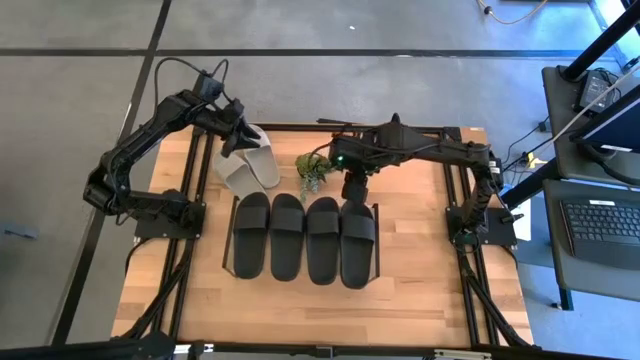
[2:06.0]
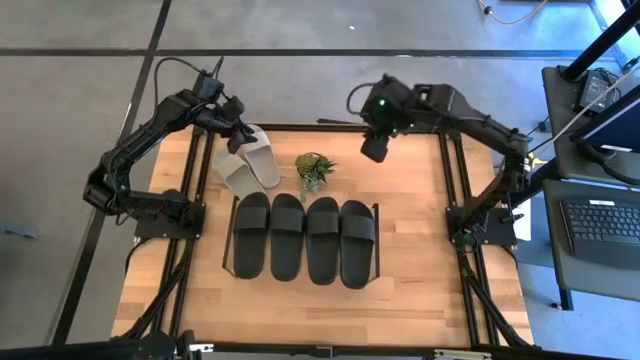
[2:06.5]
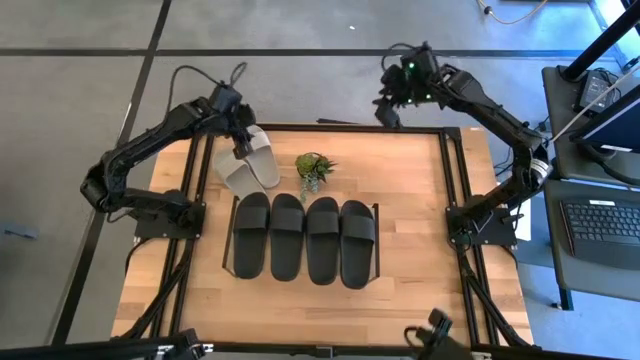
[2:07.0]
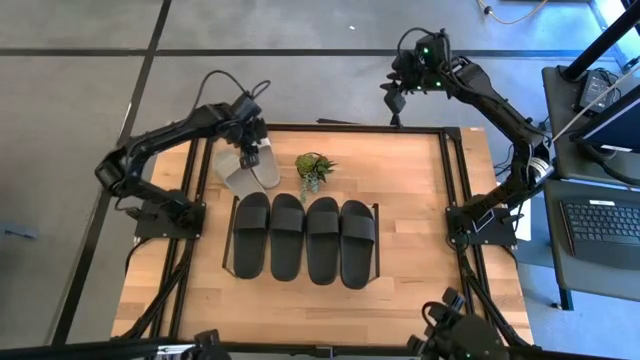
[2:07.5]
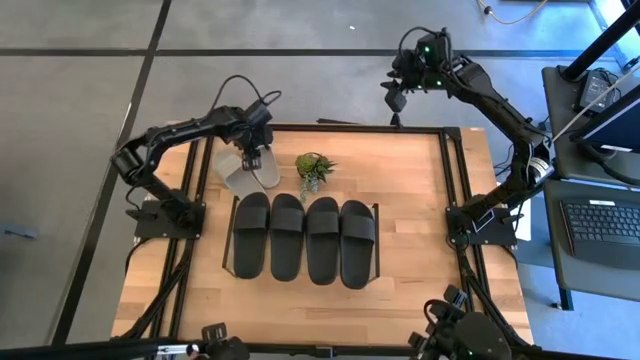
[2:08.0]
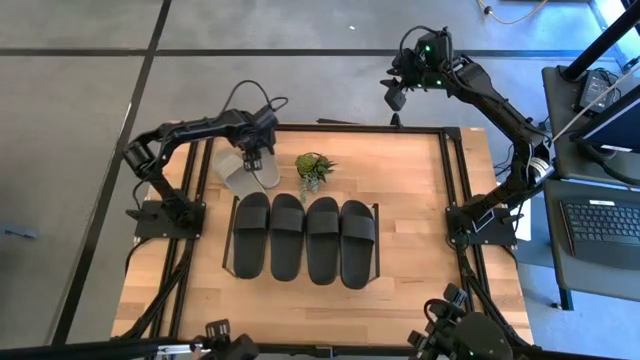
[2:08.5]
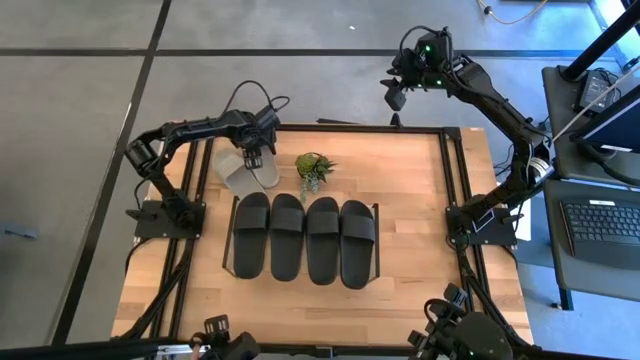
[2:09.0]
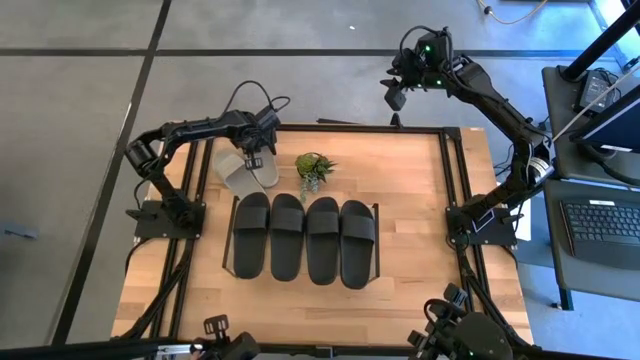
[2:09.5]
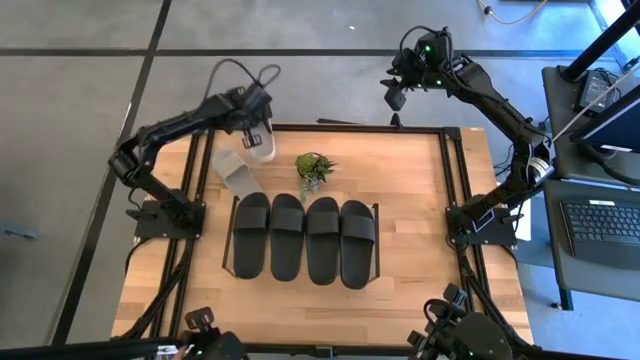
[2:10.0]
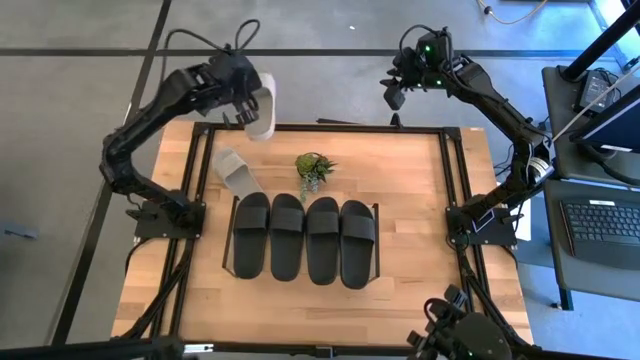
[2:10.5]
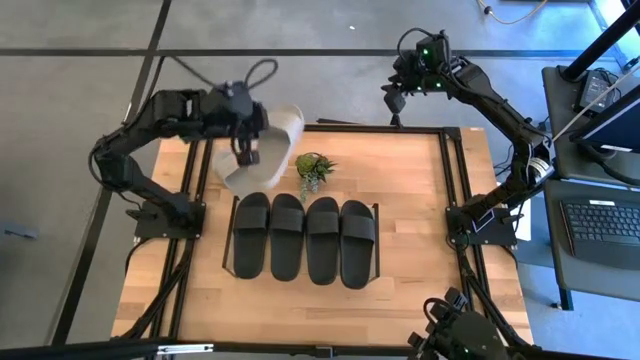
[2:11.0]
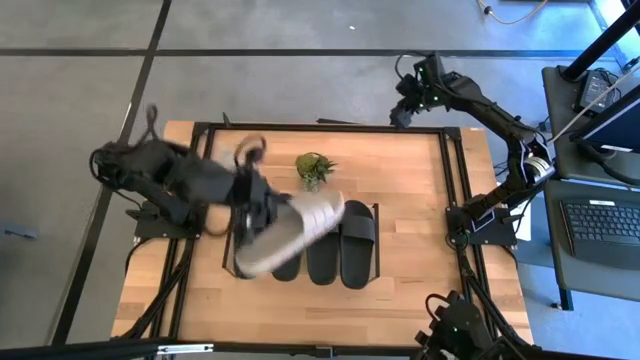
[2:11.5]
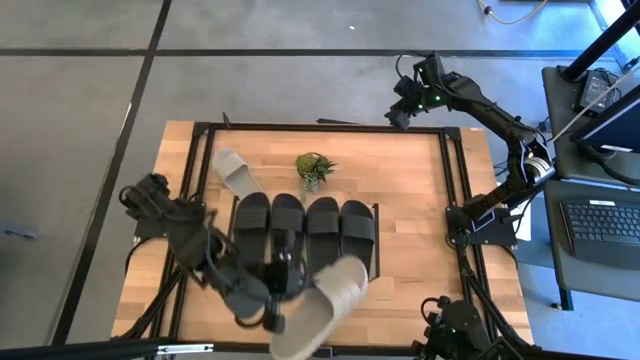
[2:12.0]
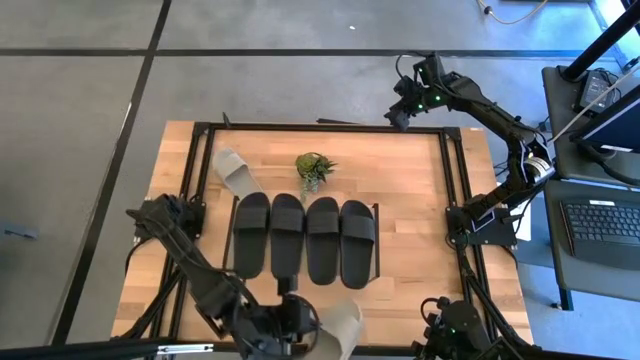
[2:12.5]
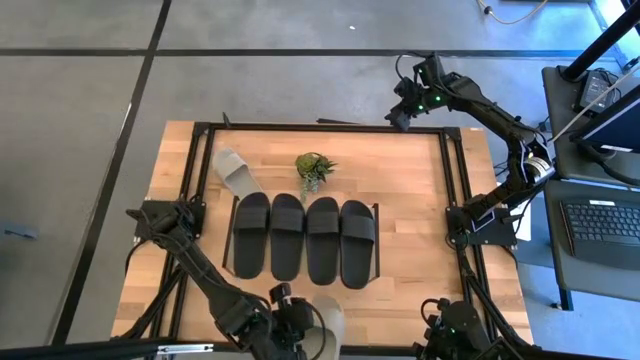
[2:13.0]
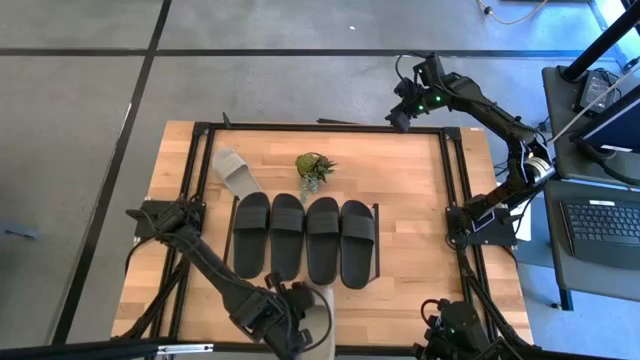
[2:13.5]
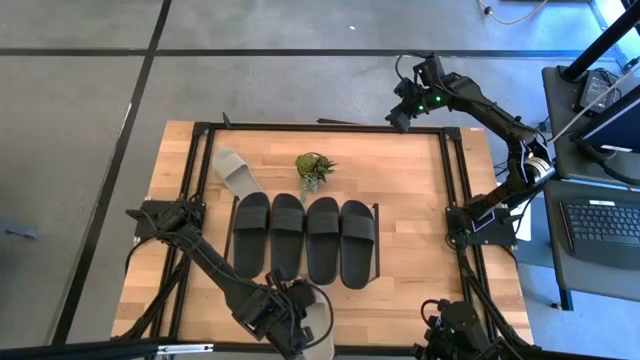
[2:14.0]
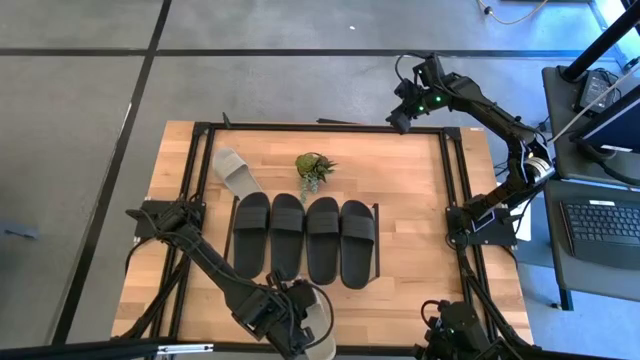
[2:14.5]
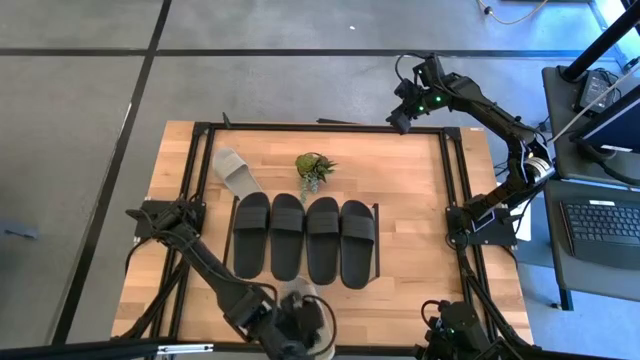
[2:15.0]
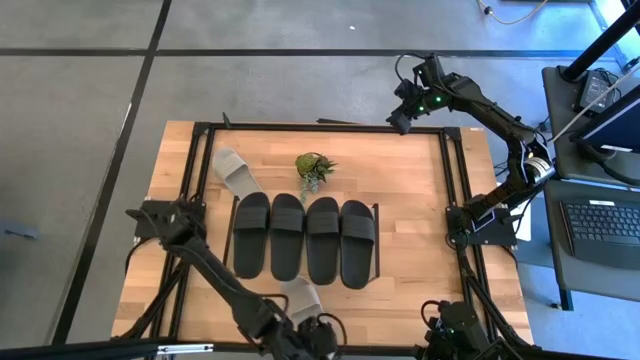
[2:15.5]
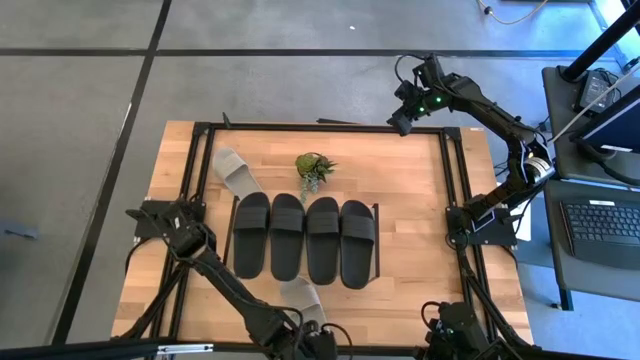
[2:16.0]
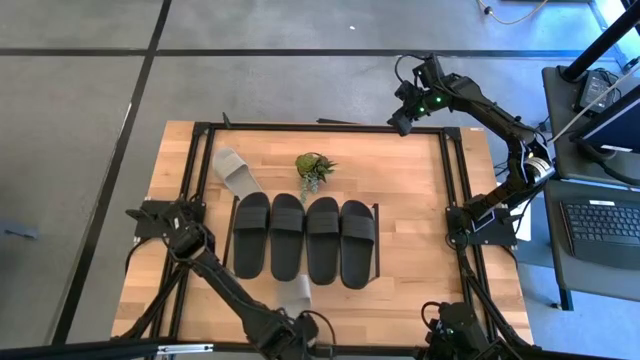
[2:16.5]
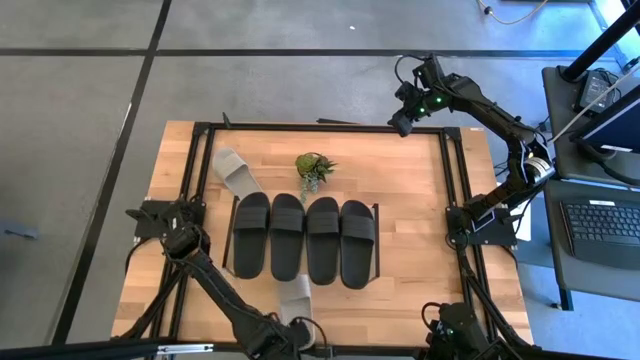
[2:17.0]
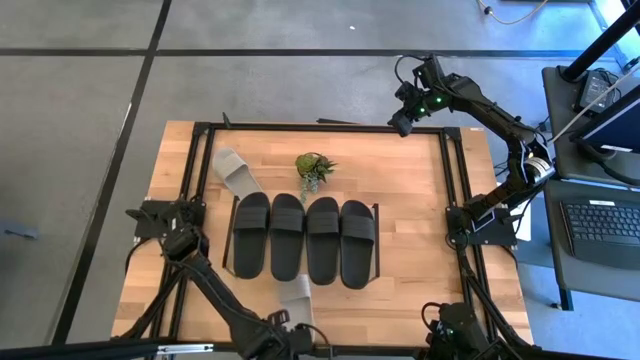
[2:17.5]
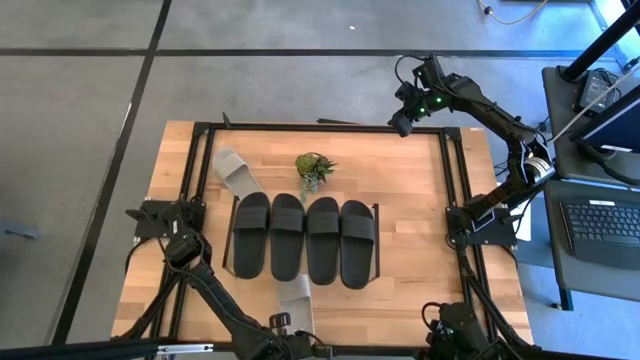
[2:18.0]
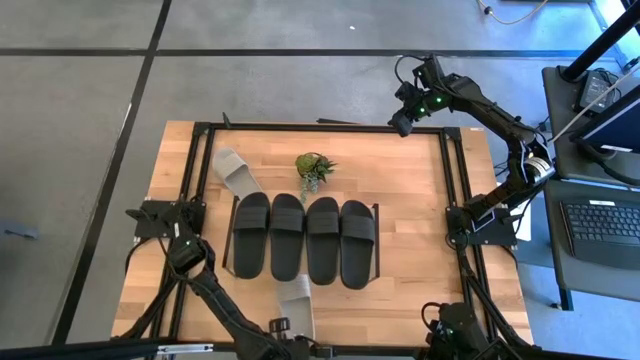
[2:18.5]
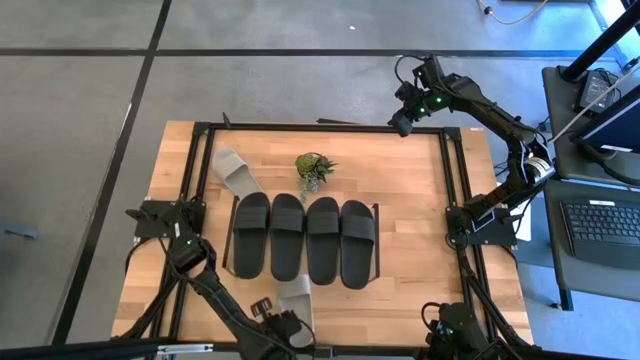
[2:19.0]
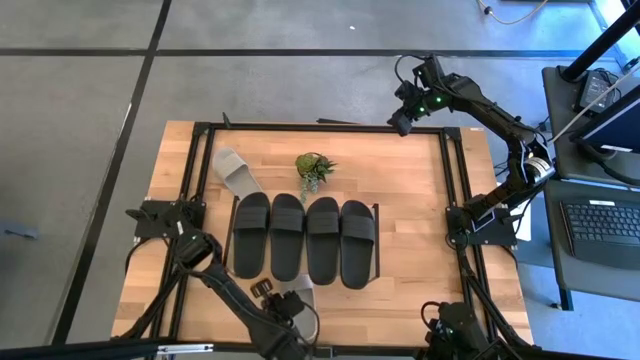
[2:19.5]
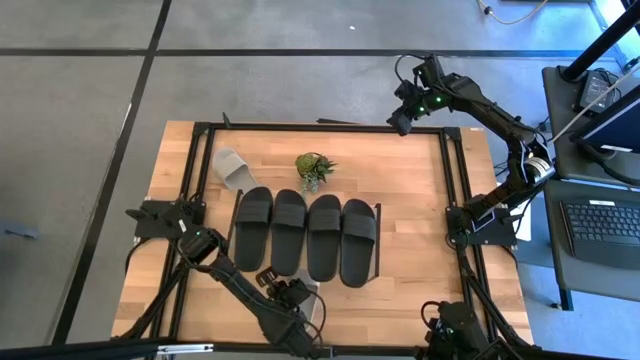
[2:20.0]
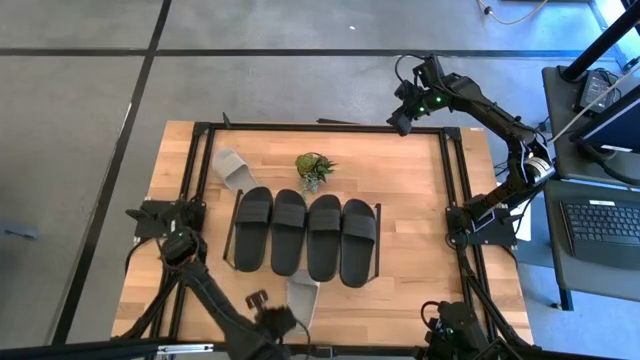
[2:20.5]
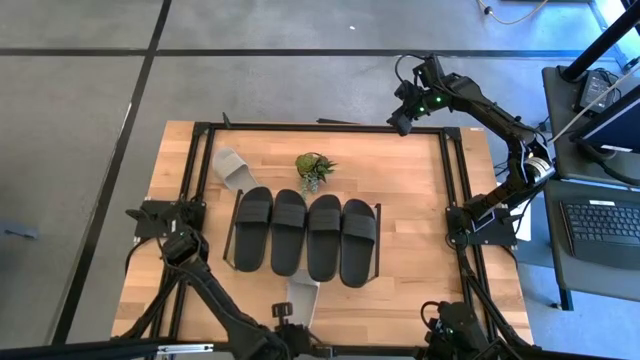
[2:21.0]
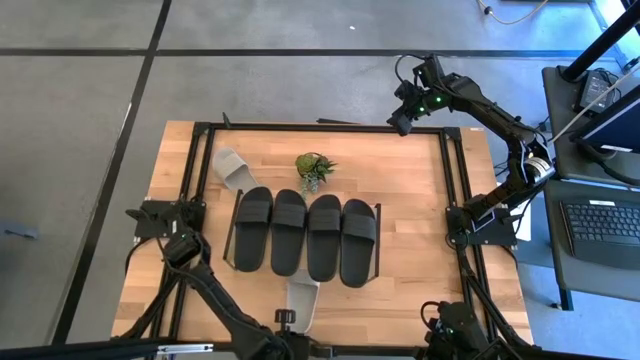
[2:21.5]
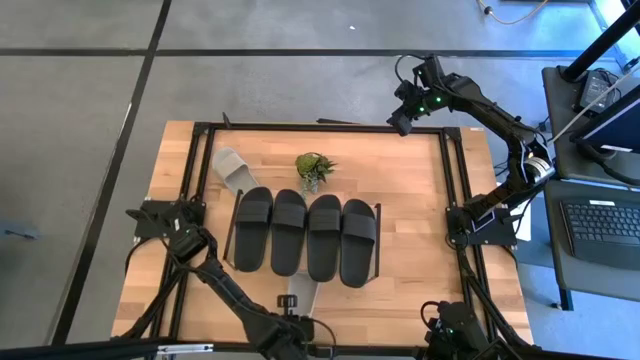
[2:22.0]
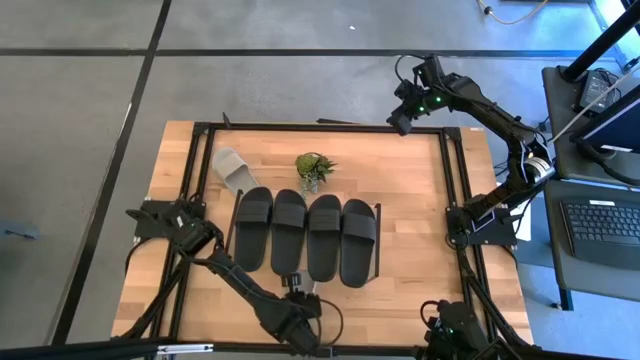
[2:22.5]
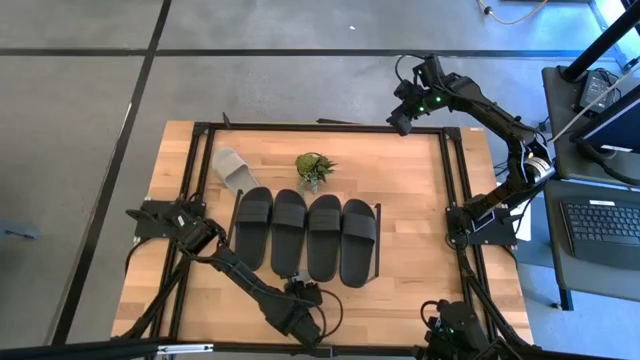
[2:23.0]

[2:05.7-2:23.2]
Task: Pick and place slides into the shelf
Put the gray slide under the shelf

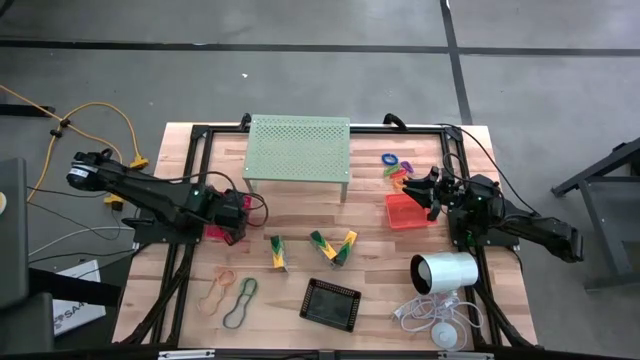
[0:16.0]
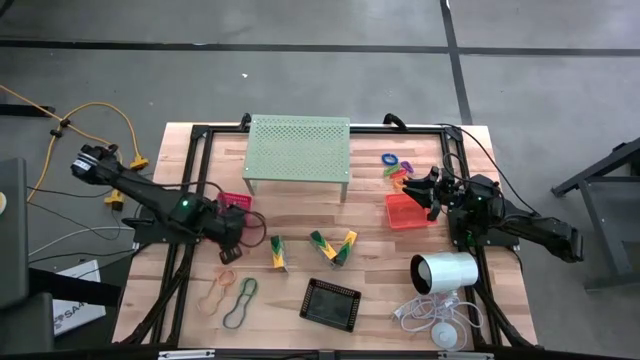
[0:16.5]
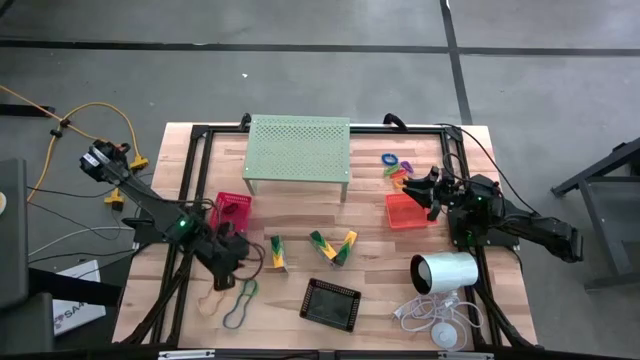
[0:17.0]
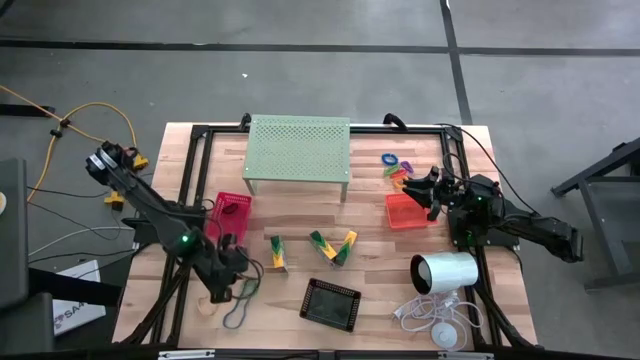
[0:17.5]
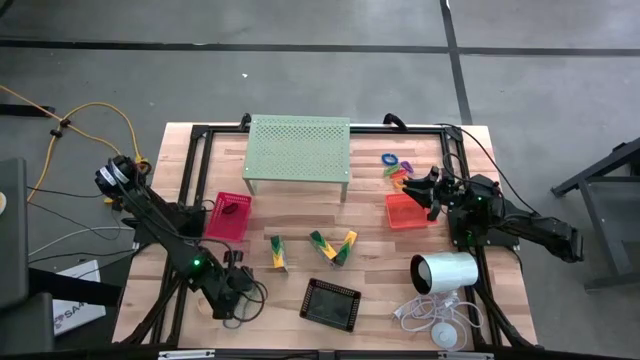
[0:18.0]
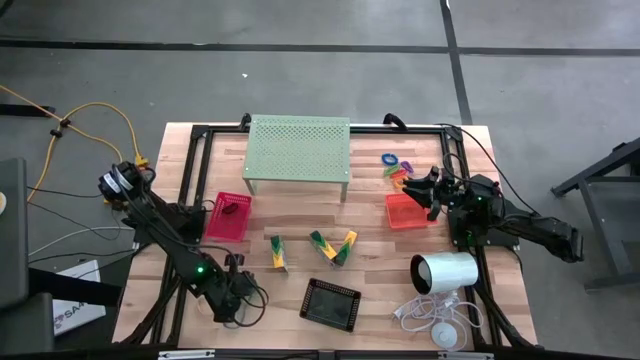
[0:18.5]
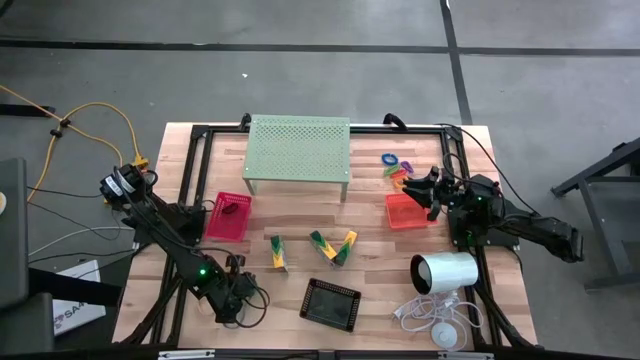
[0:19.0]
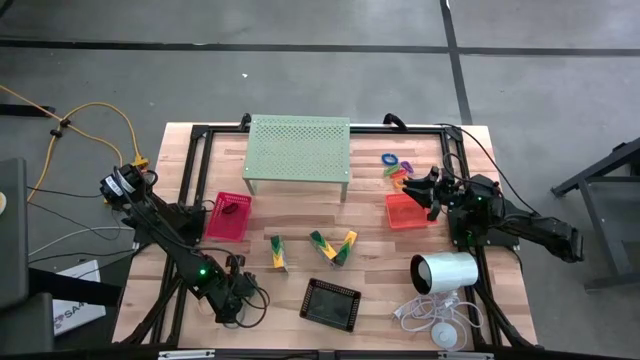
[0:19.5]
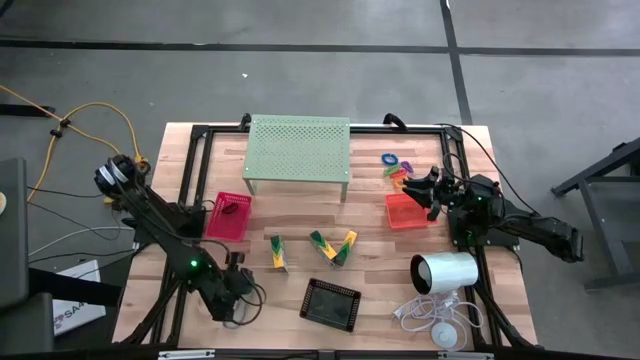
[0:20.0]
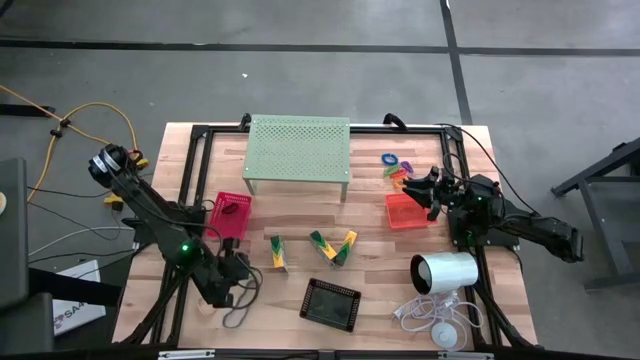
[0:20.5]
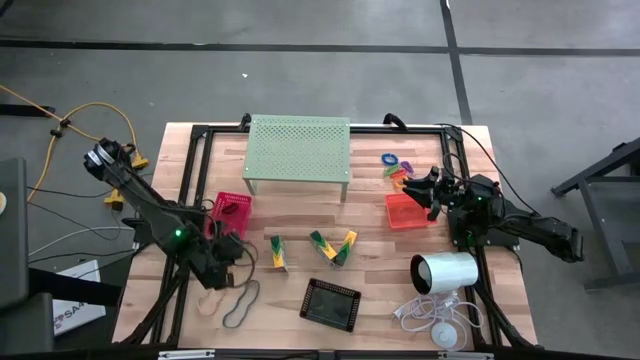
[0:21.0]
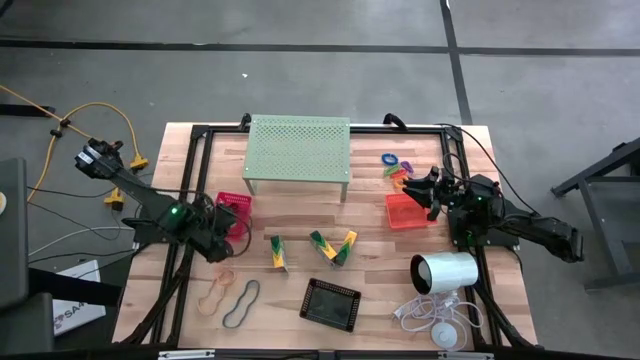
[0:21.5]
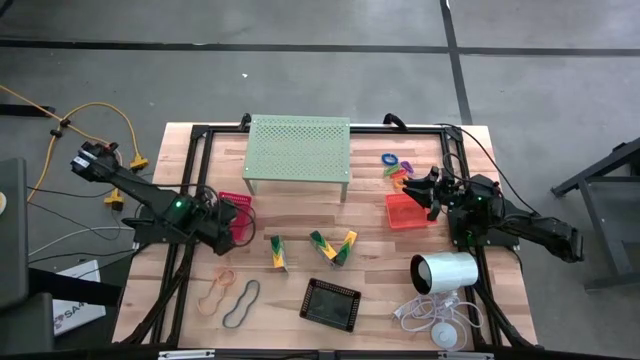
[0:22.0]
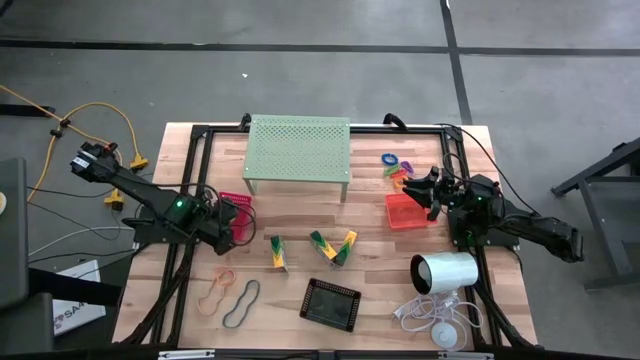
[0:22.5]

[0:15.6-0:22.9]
Task: Pick & Place Office Desk Supplies
Put the green rubber band into the red bin
